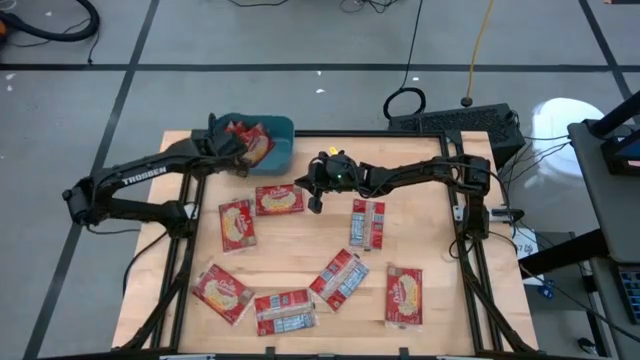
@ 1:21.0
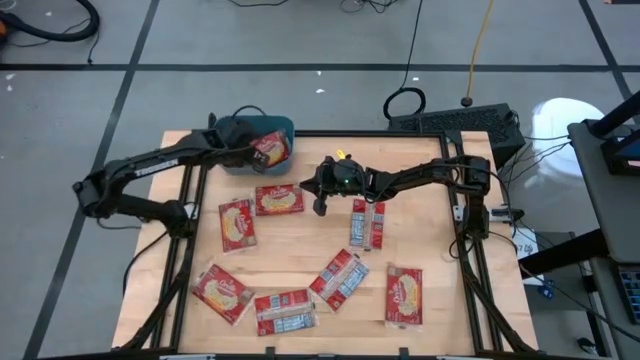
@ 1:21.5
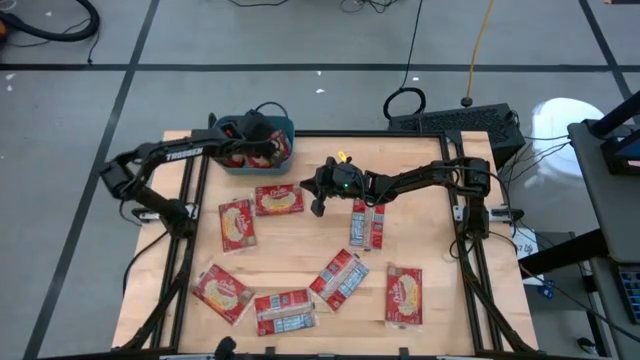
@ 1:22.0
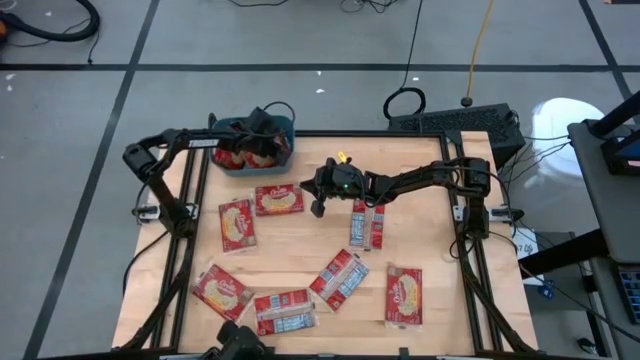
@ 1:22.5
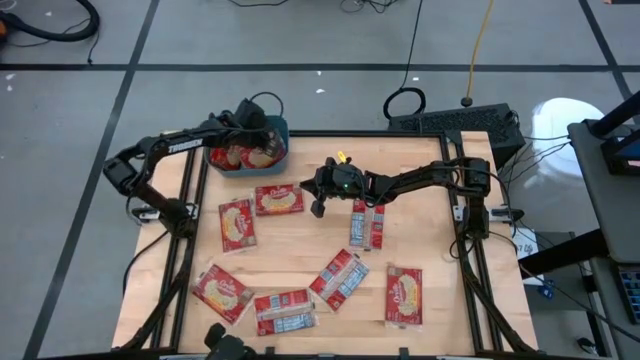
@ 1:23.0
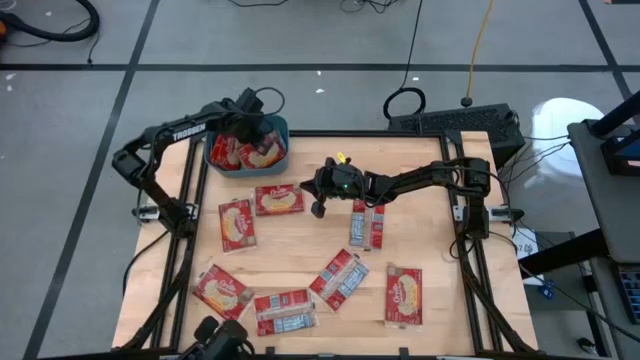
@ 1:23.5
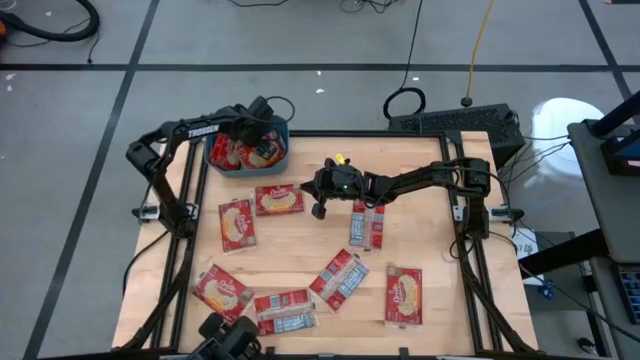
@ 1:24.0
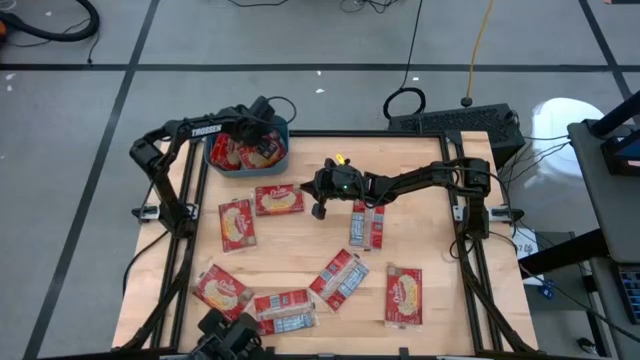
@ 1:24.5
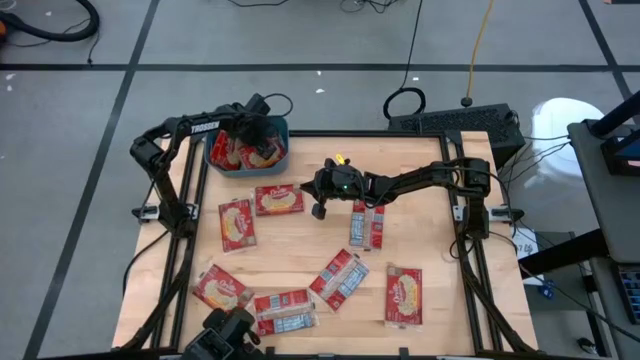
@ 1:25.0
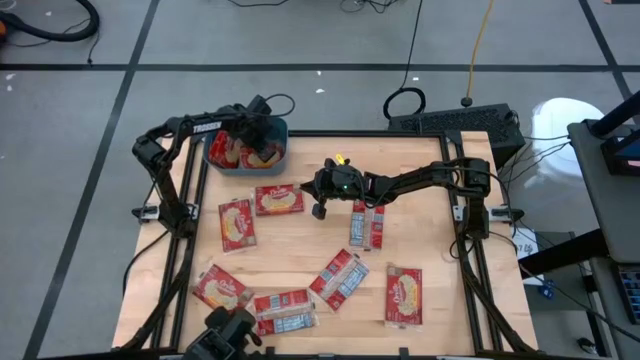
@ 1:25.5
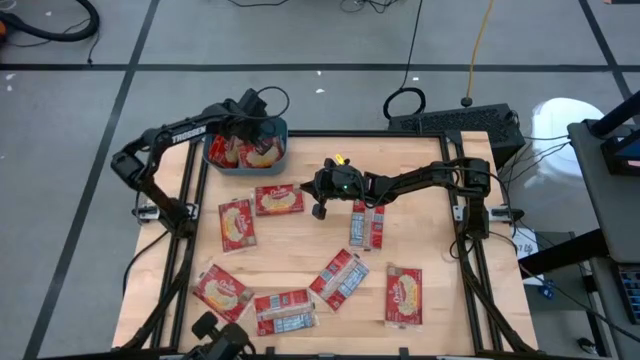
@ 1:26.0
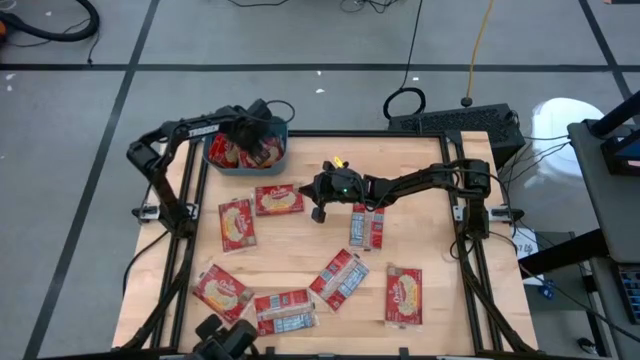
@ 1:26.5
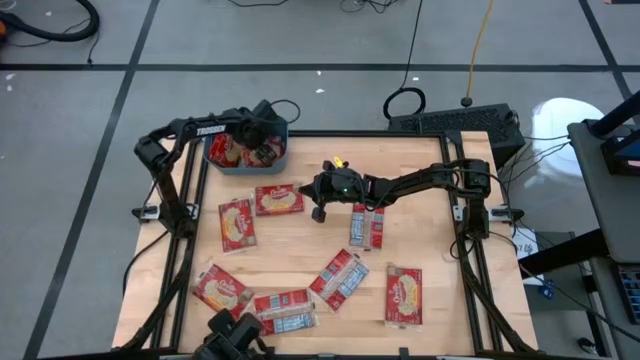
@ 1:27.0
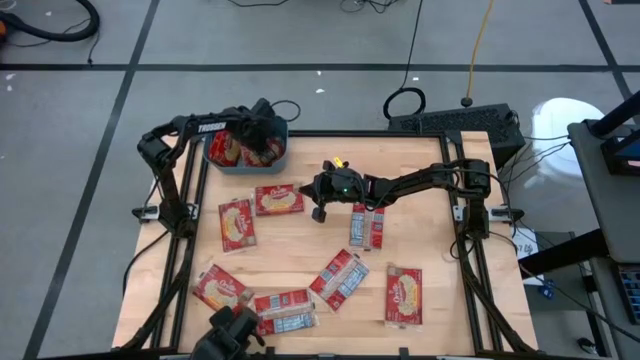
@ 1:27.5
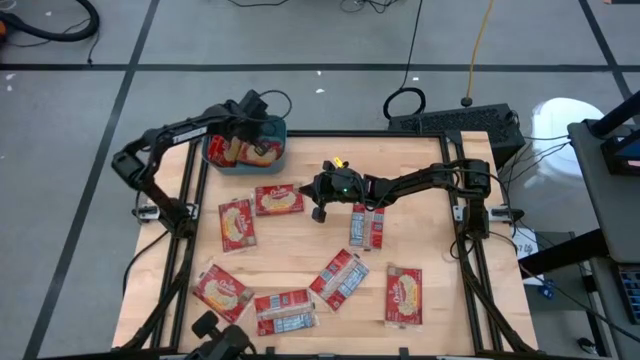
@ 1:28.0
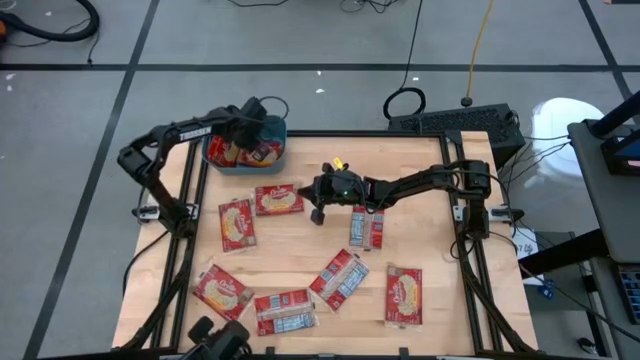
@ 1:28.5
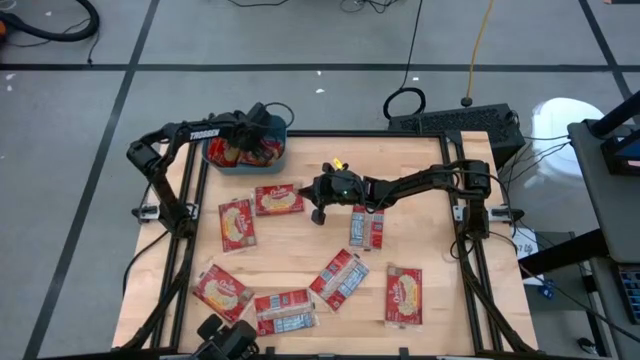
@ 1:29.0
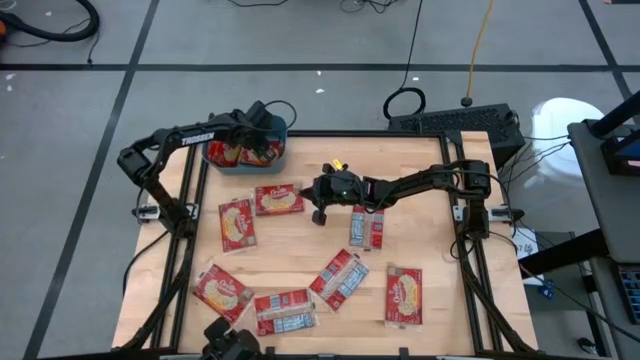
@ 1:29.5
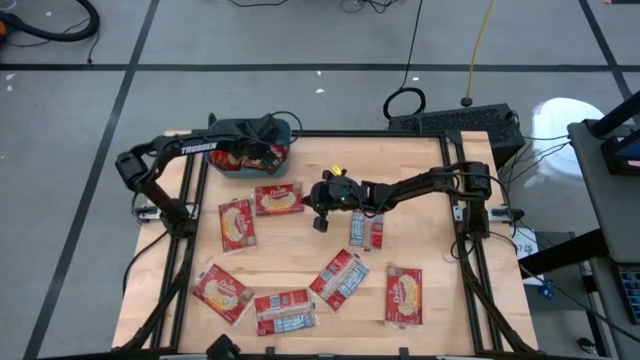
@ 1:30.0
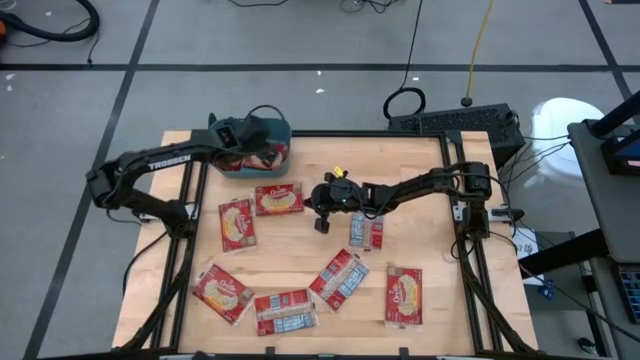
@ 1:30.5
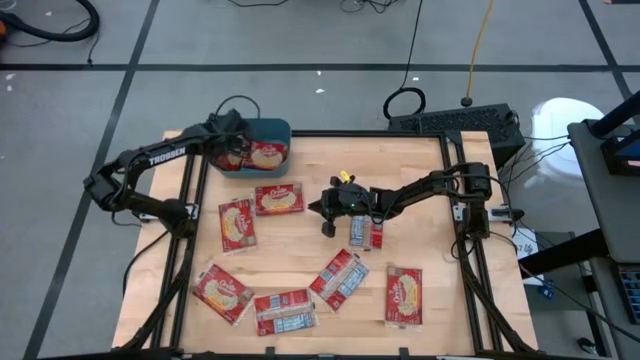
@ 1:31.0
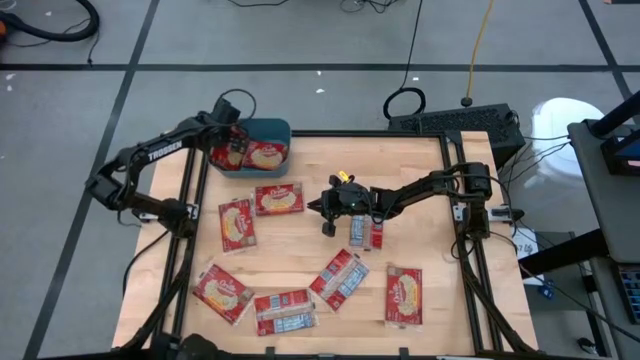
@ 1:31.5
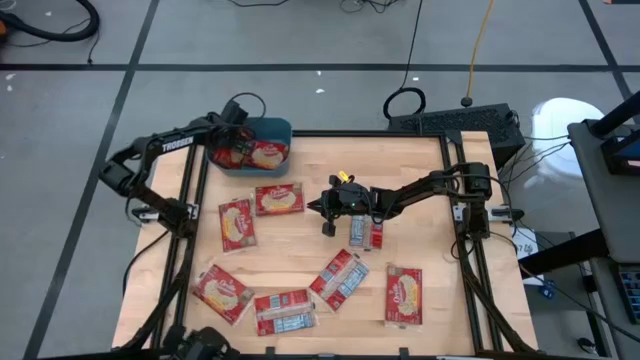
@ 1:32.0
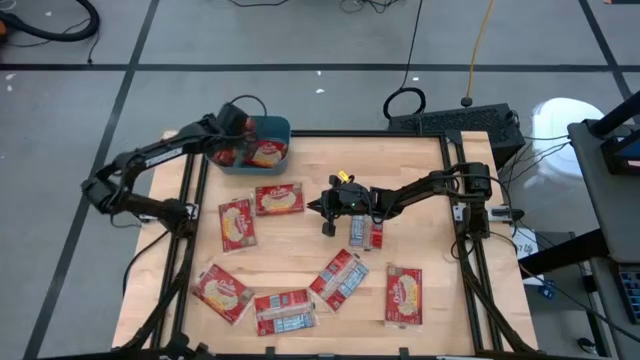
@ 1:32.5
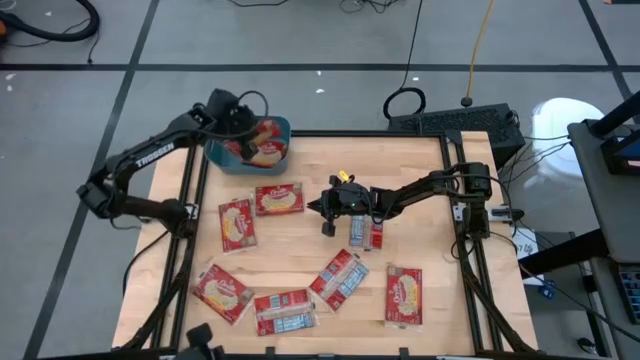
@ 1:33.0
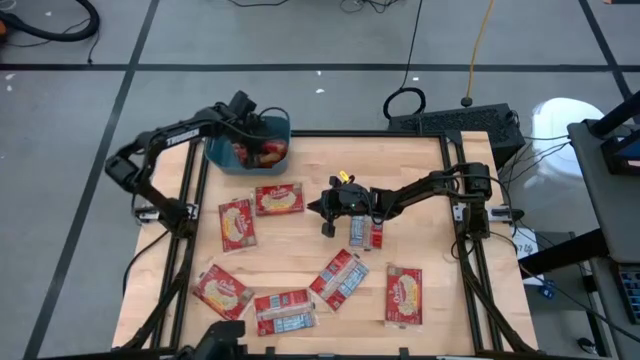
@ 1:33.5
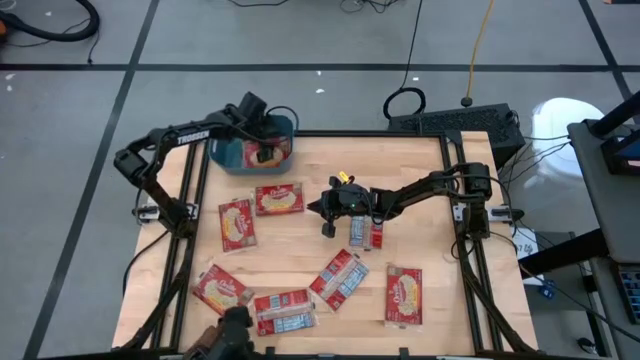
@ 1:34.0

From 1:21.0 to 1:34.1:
Task: Sort popcorn bags into baskets
Adjust the red popcorn bags in the blue bin

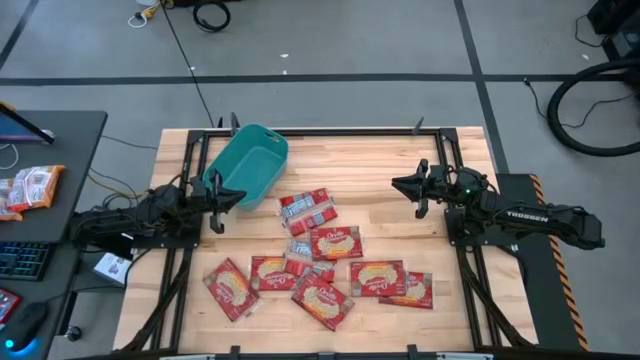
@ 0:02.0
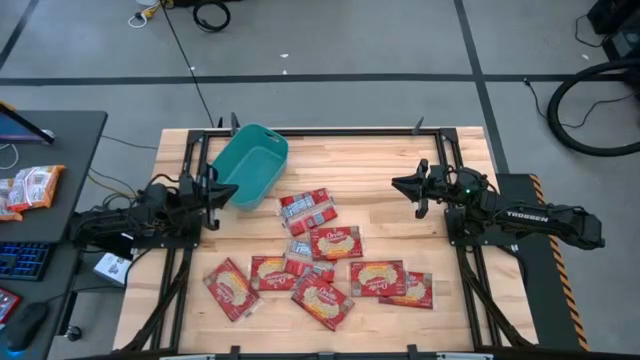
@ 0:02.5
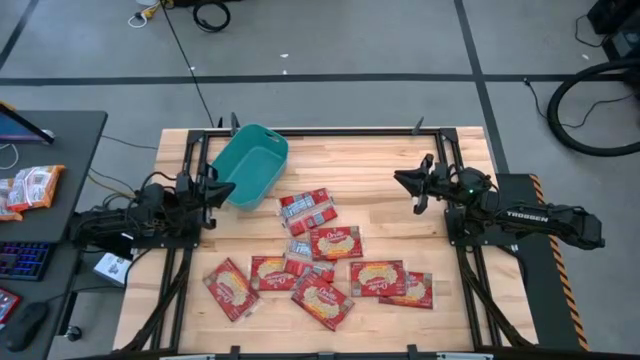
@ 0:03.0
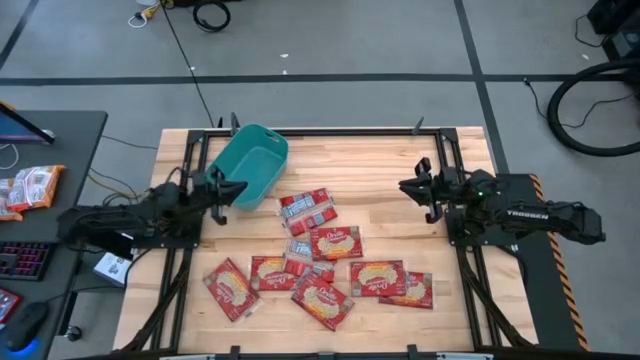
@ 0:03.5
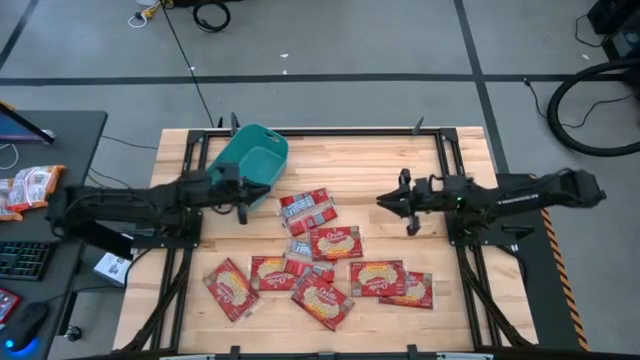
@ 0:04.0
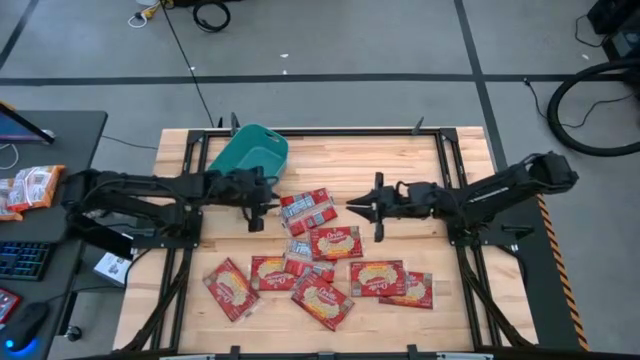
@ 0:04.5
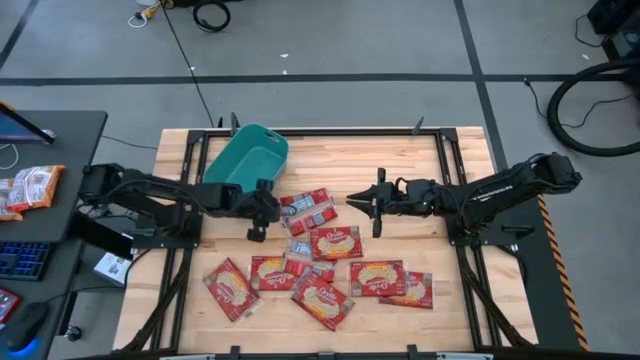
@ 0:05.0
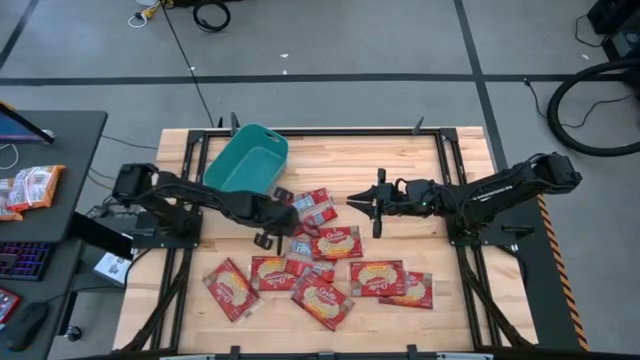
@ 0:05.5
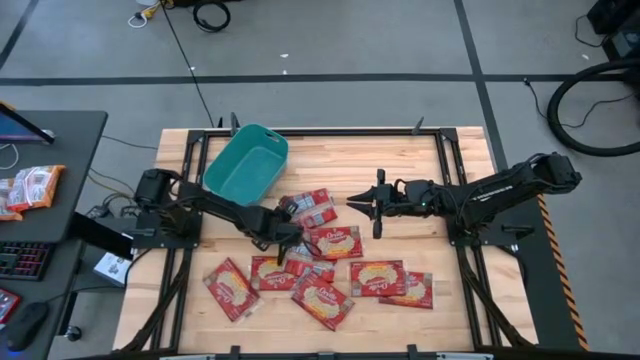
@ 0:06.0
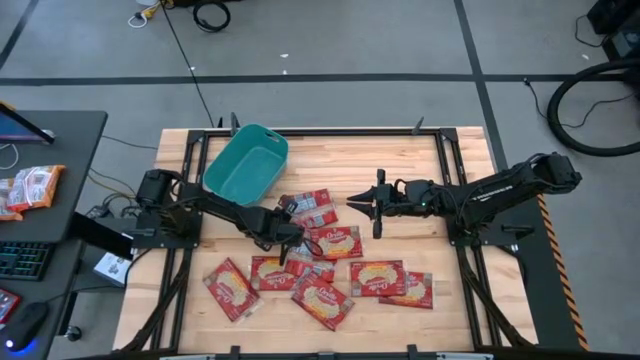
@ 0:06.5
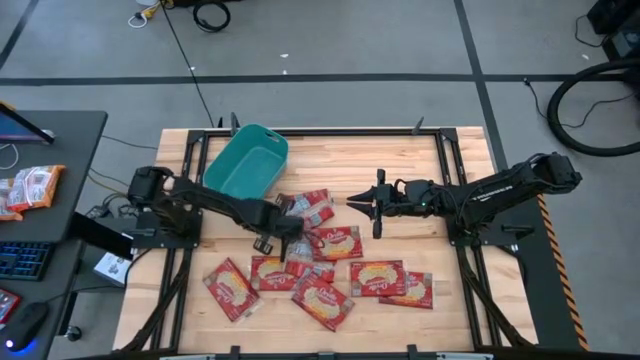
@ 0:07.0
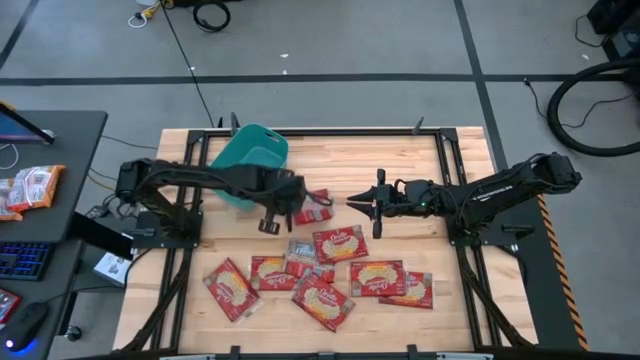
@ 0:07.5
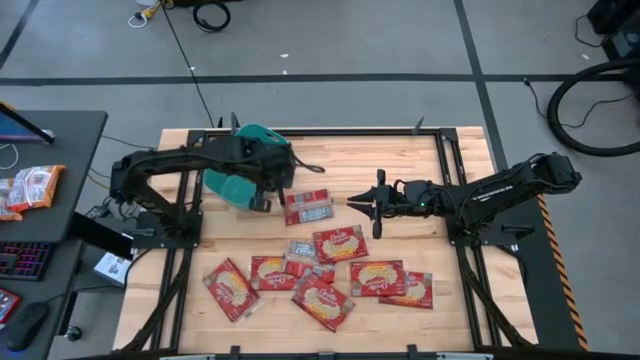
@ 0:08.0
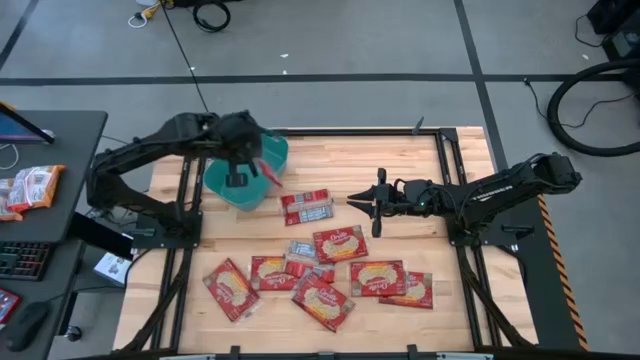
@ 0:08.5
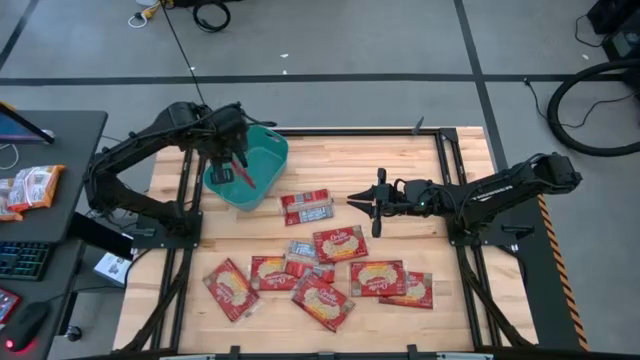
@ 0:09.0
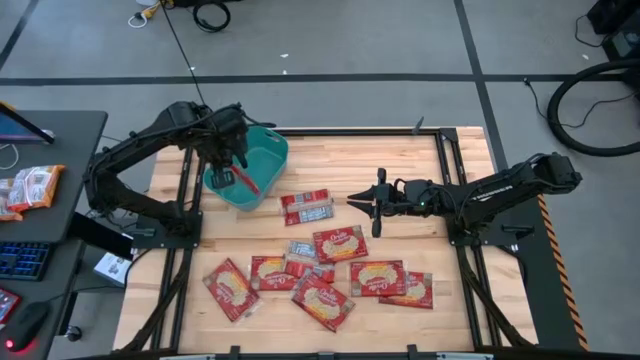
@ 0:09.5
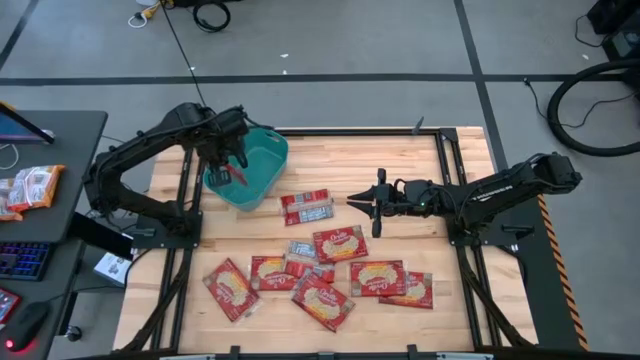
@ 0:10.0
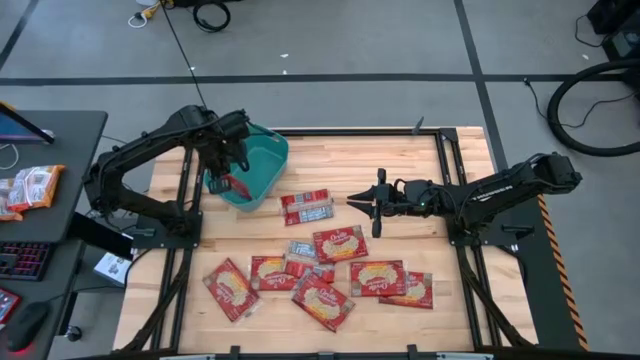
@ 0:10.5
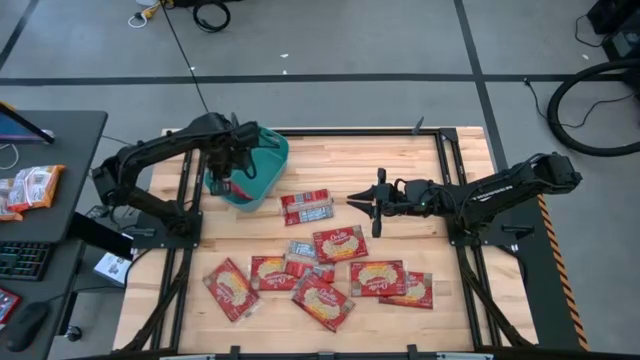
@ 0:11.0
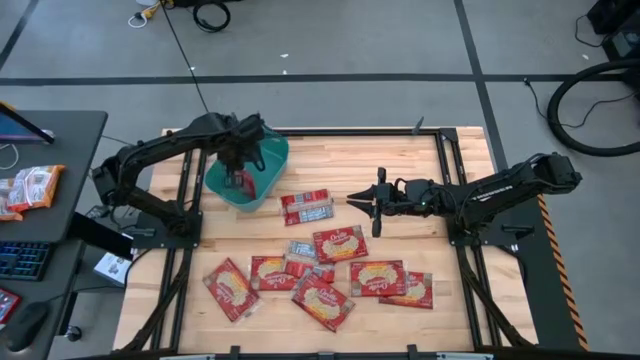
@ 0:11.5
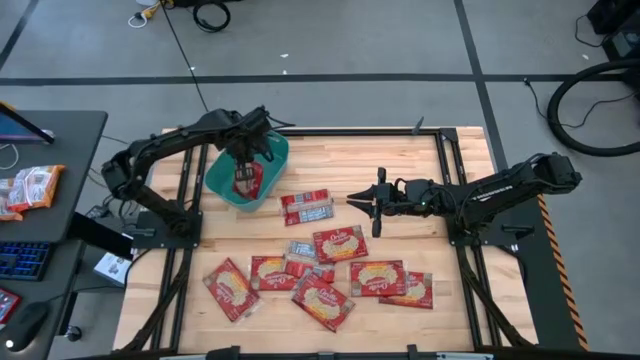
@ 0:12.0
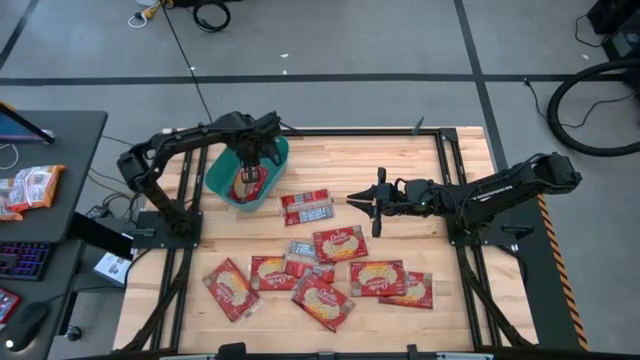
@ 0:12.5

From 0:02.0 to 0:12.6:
Task: Sort popcorn bags into baskets
Put the red popcorn bag into the green bin
